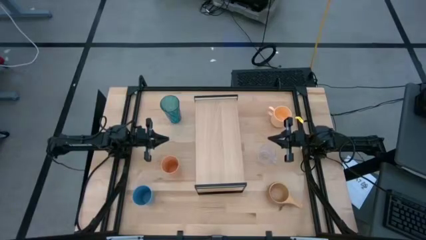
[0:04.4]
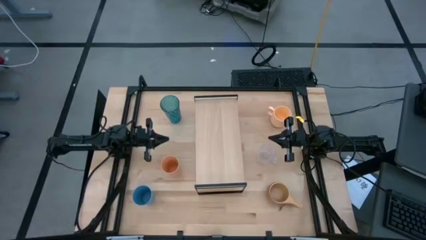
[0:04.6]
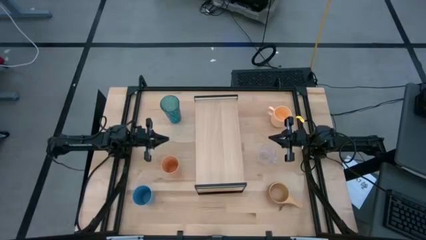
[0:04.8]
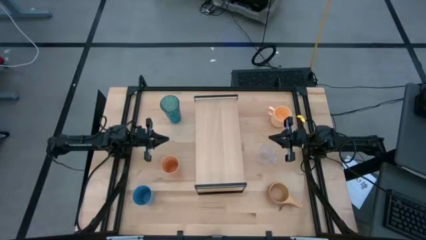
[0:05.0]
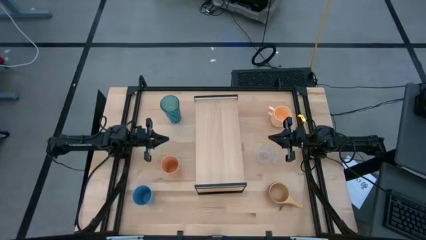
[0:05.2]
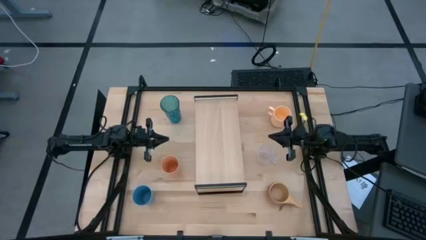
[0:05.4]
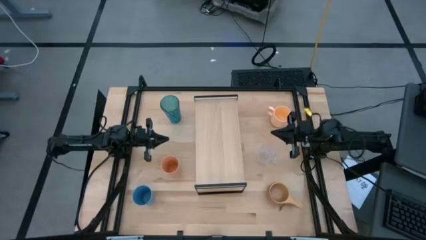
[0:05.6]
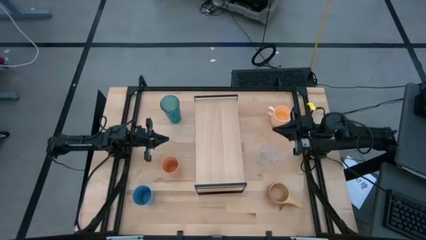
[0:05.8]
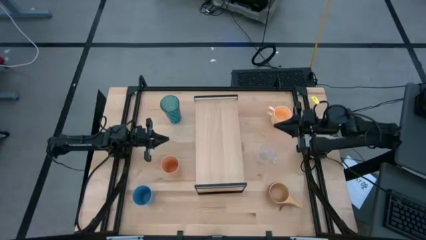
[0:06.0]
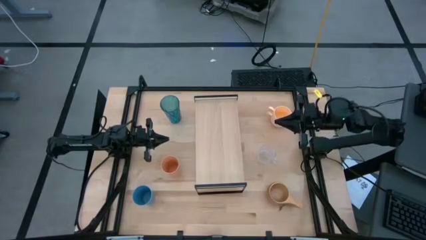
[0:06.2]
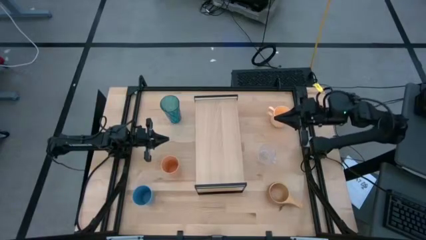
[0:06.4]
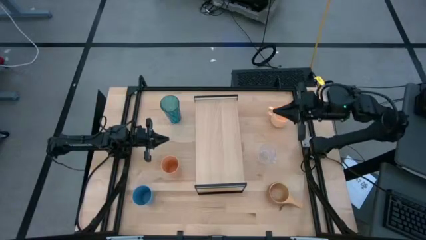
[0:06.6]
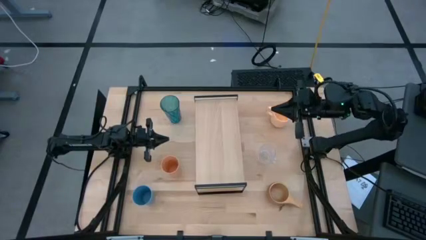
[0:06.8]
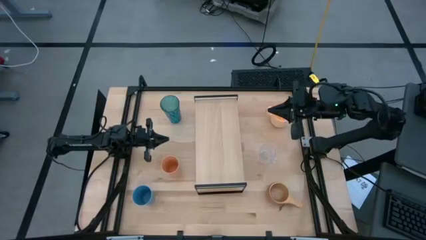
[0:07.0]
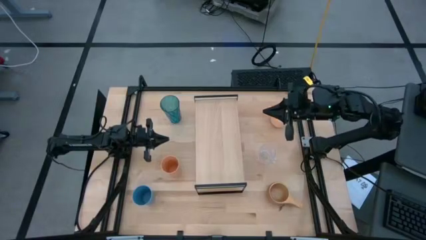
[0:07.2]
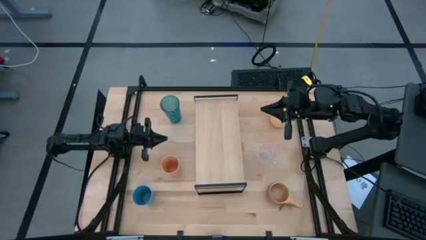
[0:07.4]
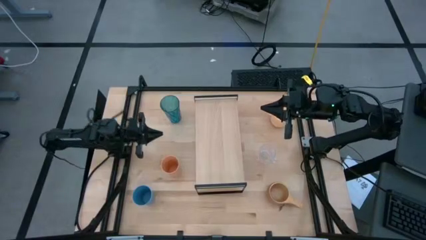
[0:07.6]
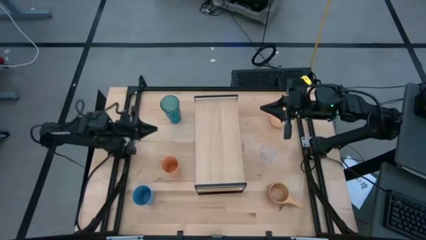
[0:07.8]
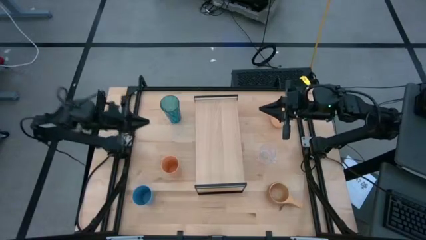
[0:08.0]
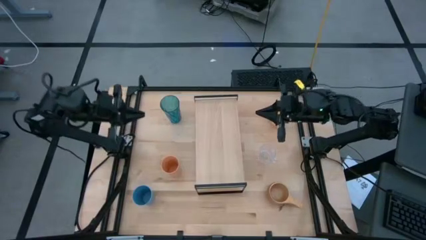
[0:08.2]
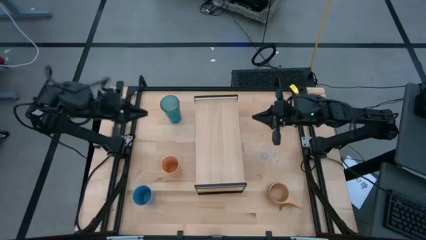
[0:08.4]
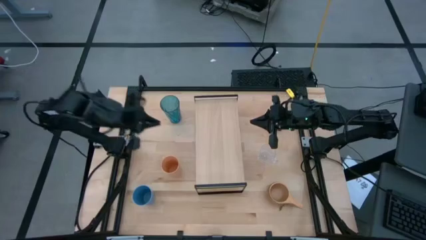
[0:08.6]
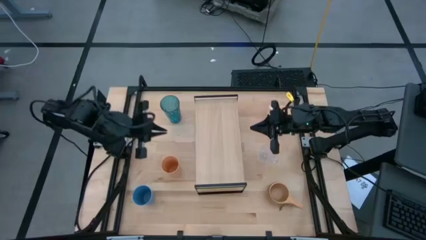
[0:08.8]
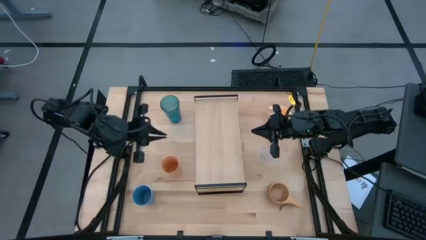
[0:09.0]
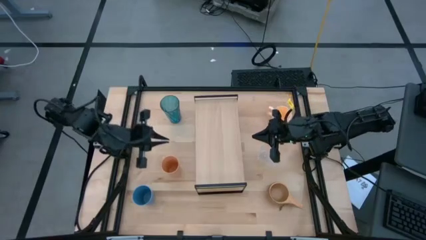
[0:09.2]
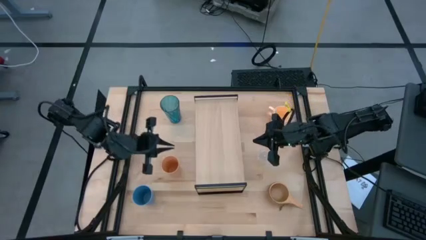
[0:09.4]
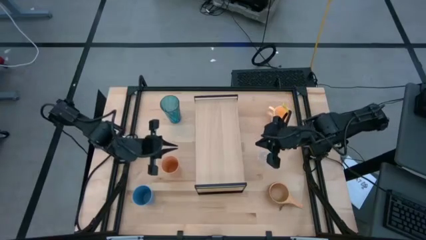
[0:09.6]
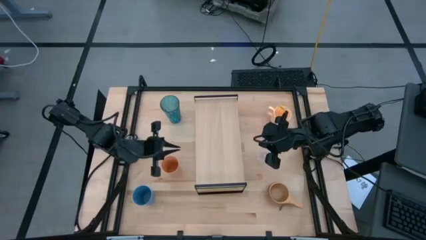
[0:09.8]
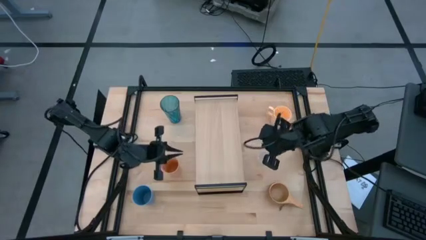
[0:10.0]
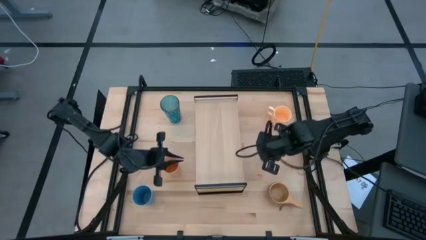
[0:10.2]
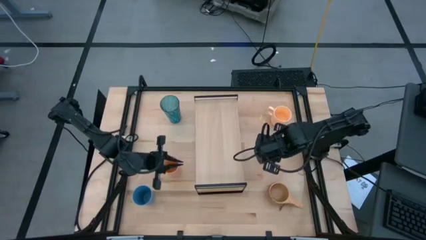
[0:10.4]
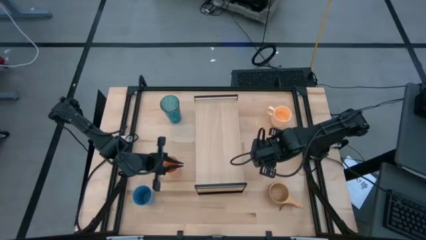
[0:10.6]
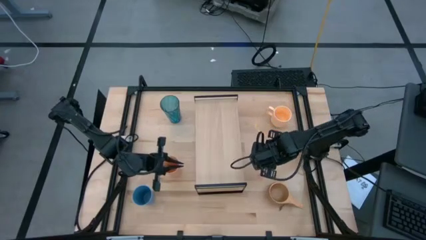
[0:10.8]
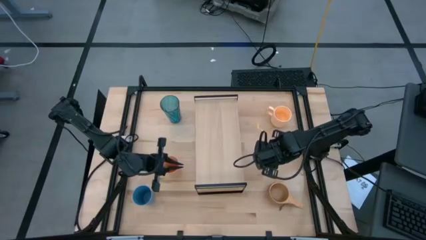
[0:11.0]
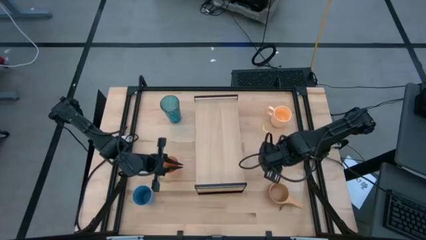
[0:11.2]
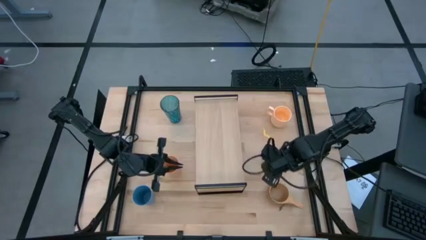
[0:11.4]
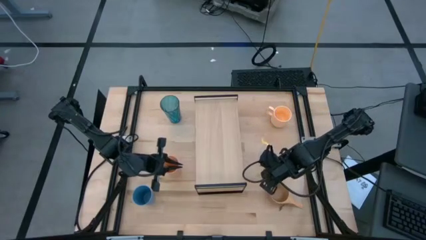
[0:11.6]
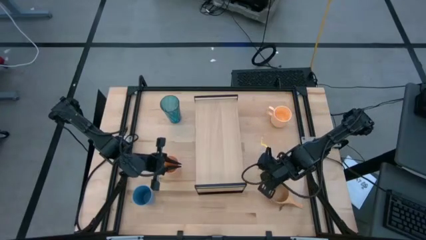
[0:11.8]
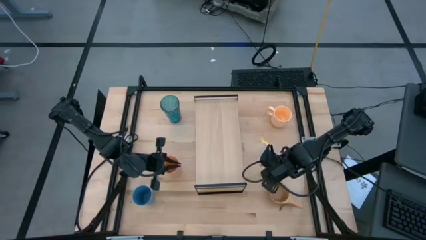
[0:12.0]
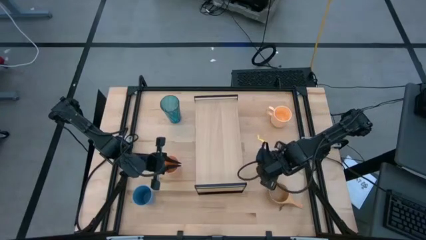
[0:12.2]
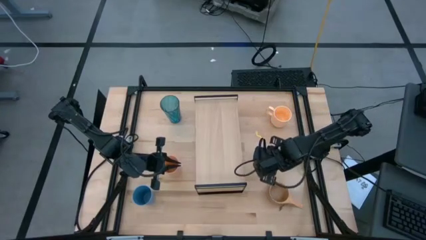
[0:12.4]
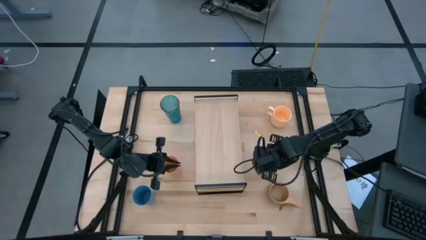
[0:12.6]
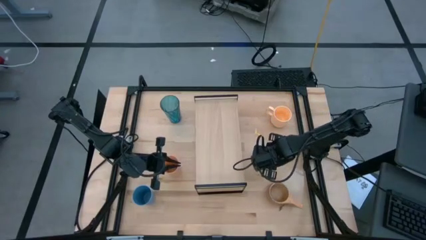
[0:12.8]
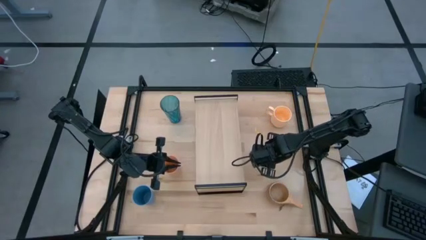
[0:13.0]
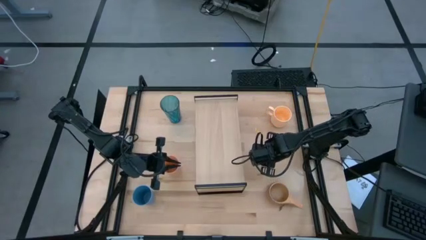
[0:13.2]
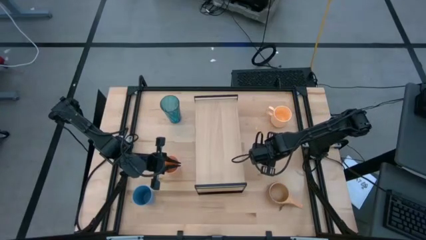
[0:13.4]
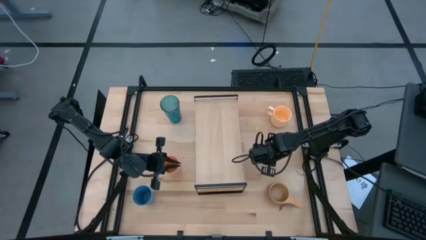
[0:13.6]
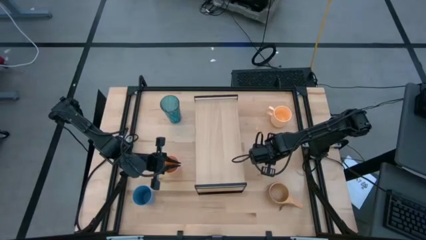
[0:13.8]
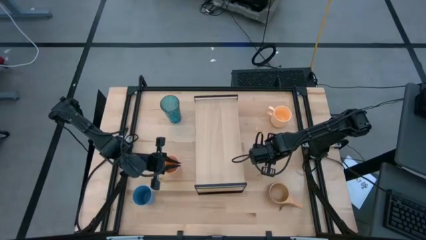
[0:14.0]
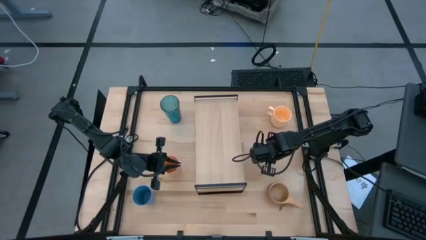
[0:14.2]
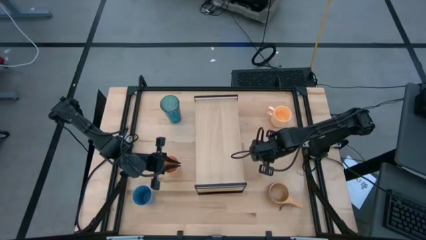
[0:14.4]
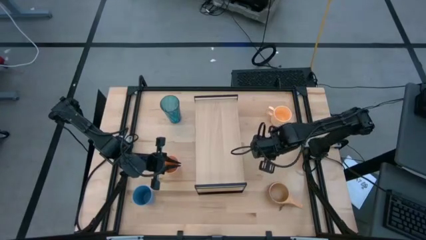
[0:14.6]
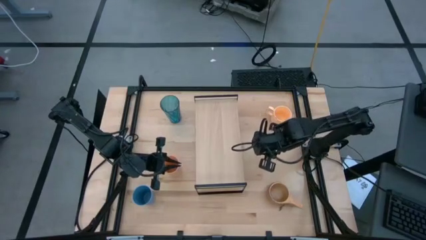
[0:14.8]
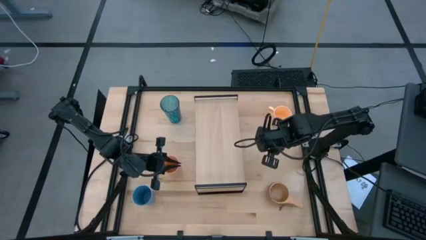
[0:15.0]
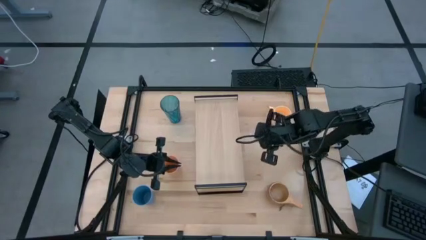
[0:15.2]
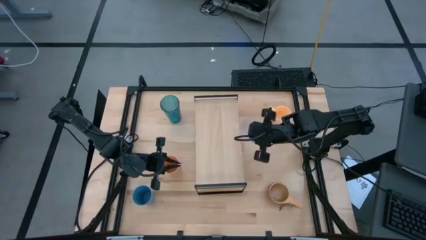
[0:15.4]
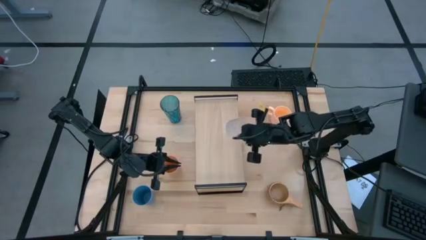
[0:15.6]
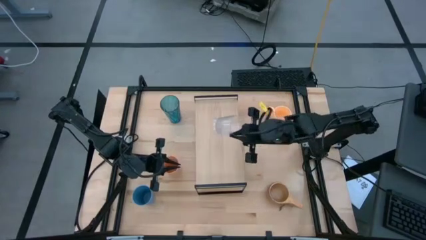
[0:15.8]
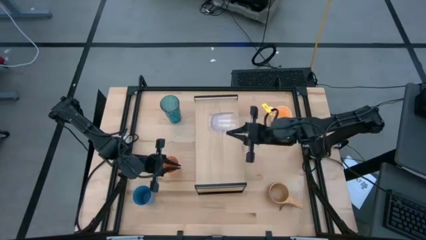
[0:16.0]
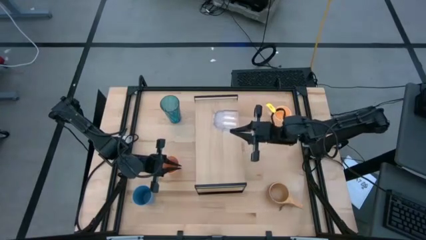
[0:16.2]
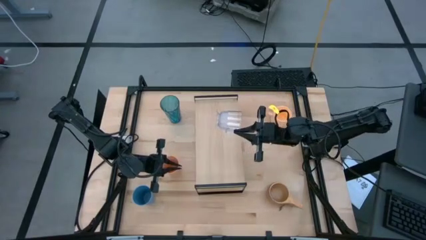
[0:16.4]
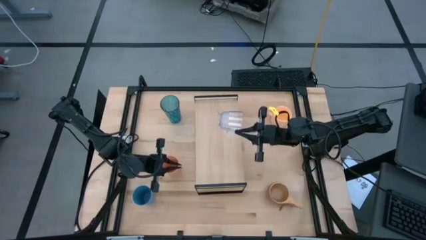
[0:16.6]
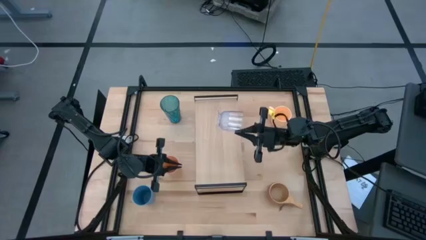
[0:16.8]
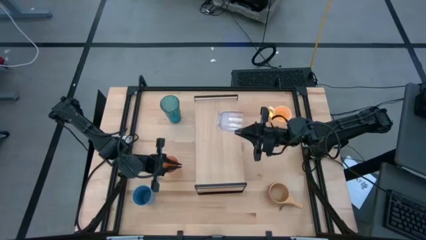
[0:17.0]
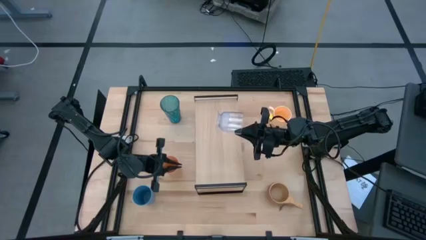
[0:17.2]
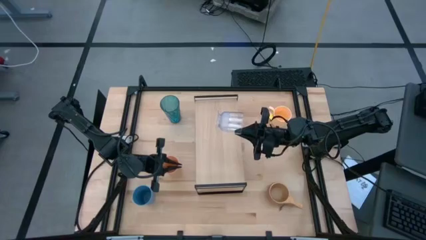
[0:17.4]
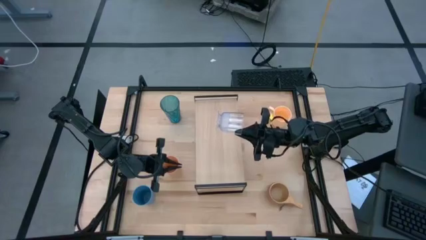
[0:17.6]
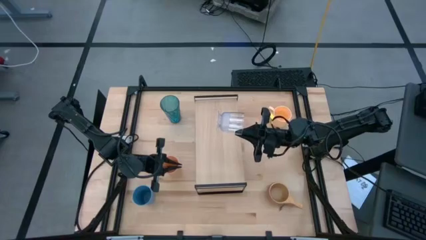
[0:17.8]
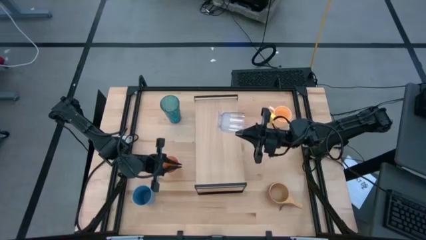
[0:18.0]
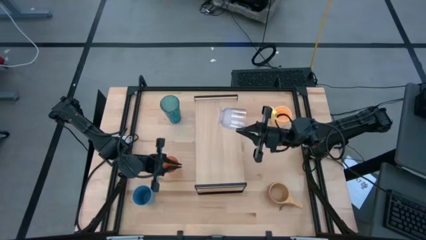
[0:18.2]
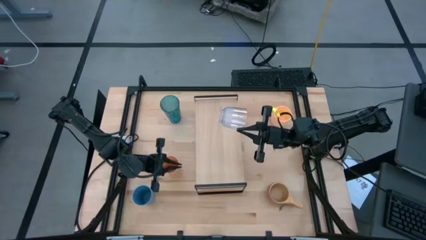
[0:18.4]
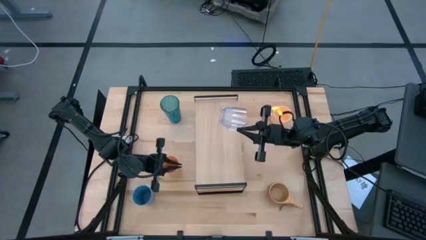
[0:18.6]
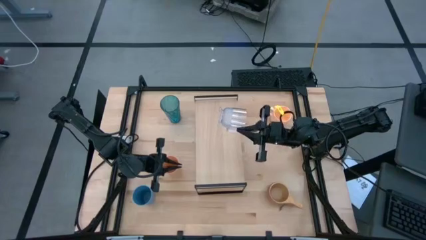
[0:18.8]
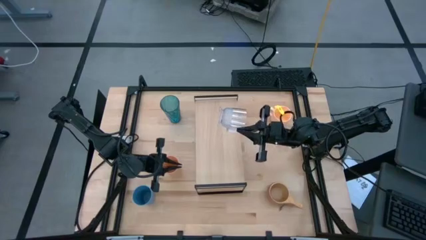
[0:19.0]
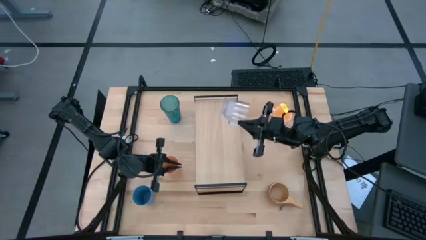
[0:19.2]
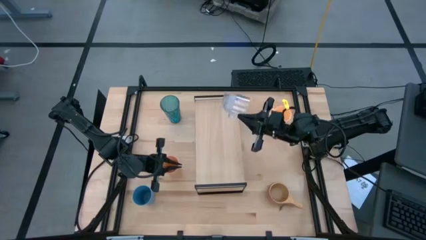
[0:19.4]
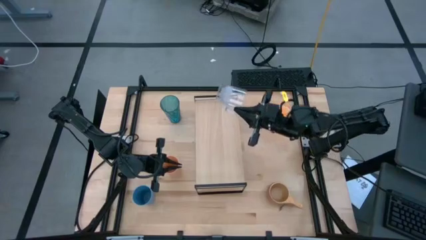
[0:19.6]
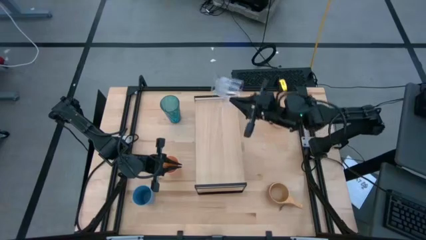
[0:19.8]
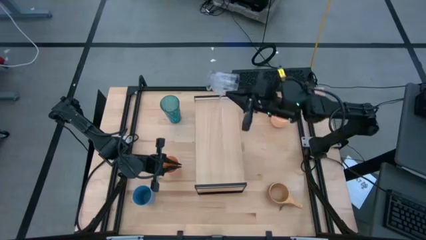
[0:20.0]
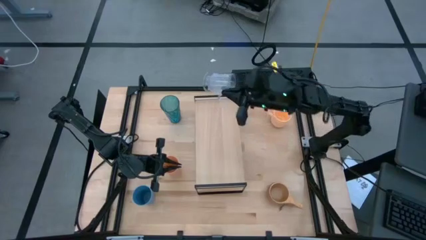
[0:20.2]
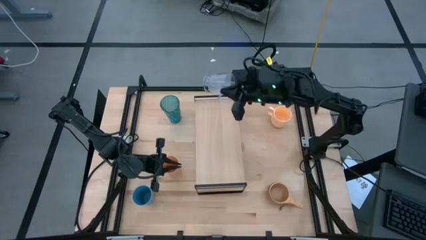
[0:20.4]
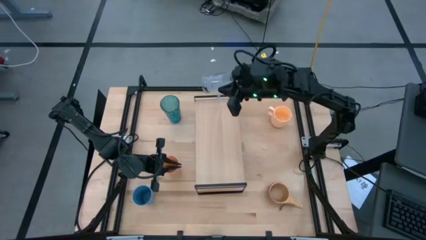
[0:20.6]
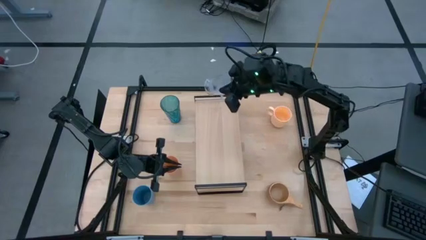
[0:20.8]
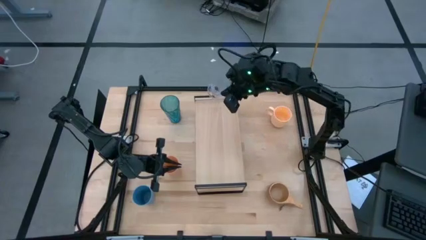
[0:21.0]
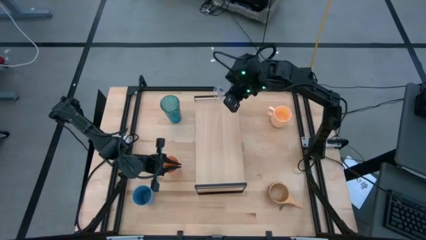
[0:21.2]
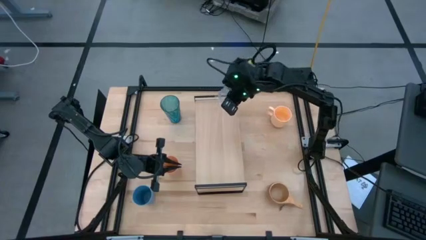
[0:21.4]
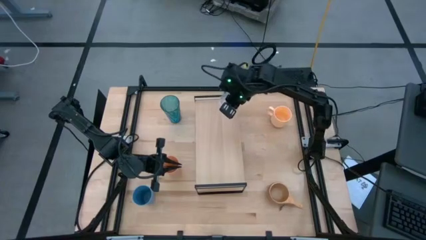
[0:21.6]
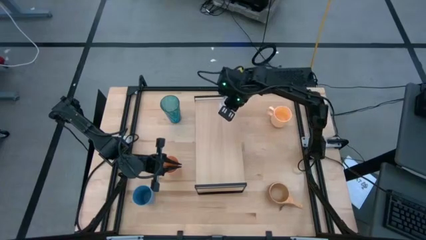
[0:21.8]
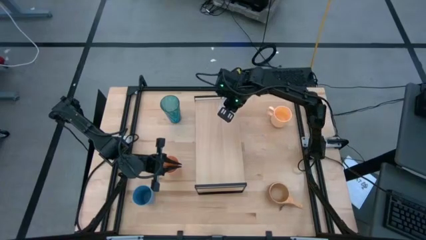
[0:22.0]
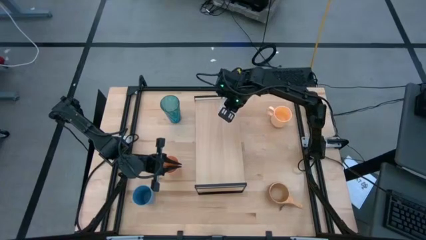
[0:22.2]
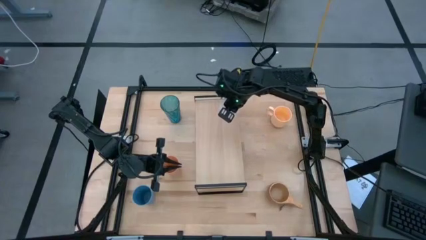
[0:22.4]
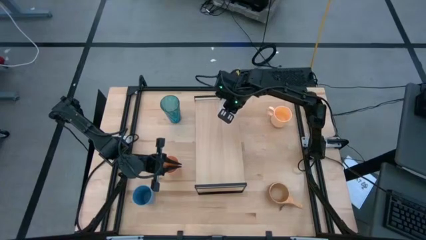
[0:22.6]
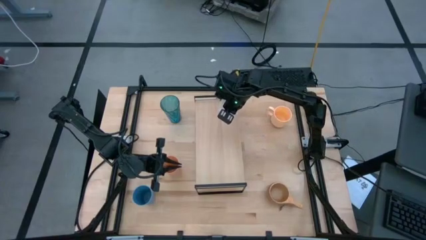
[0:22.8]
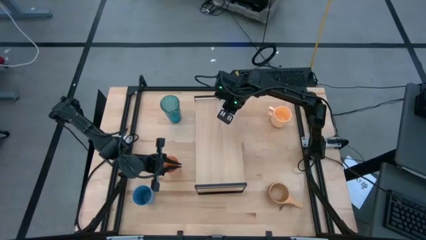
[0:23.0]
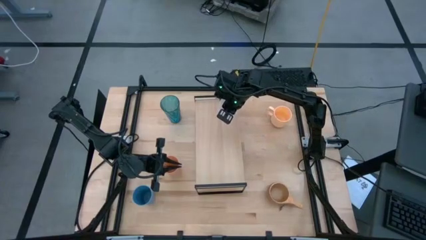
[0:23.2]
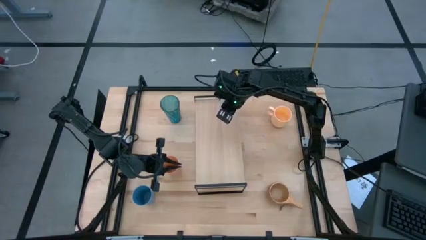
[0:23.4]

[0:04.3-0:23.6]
Task: Stack small to large cups/mugs on shelf
Put the transparent mug on the shelf
